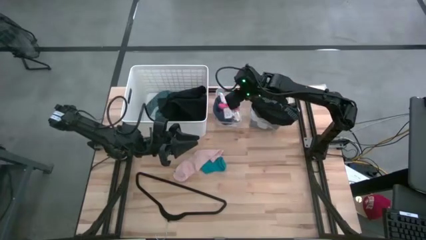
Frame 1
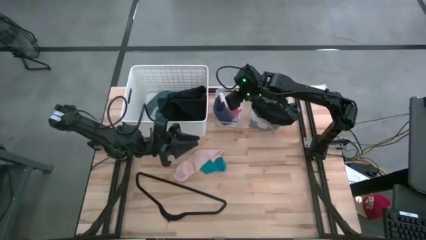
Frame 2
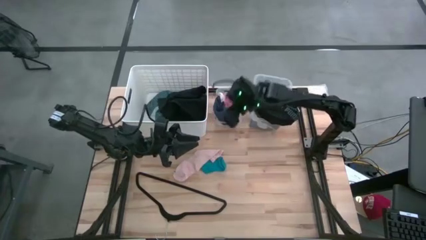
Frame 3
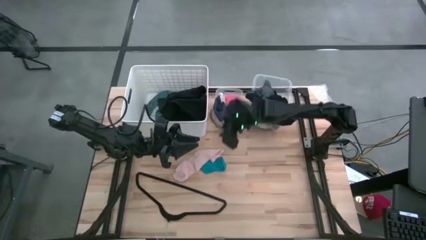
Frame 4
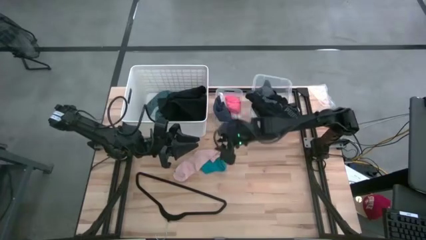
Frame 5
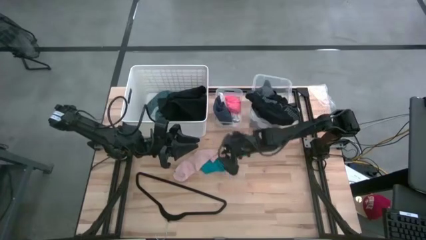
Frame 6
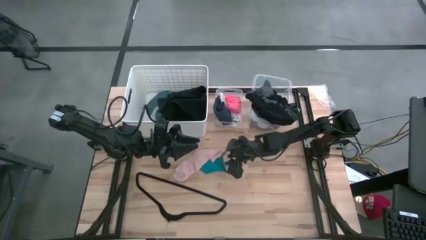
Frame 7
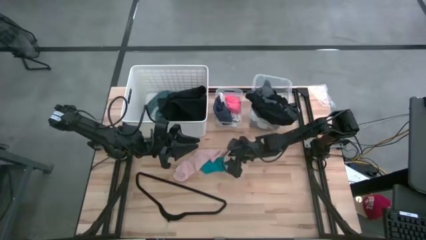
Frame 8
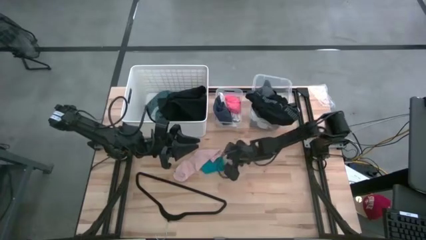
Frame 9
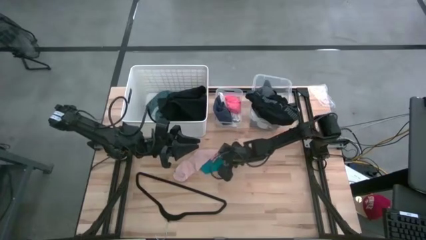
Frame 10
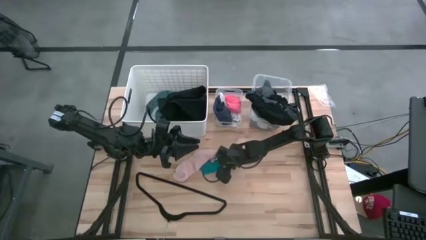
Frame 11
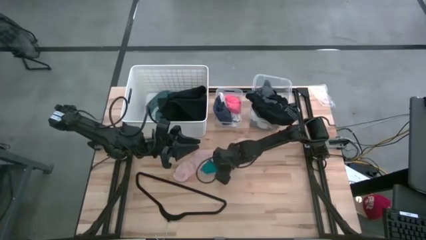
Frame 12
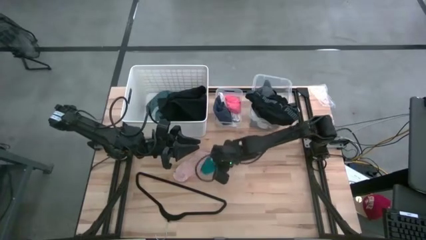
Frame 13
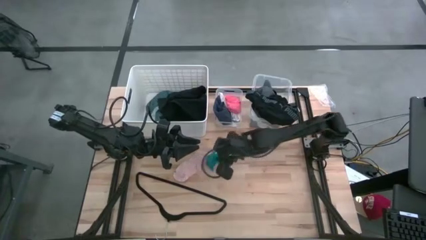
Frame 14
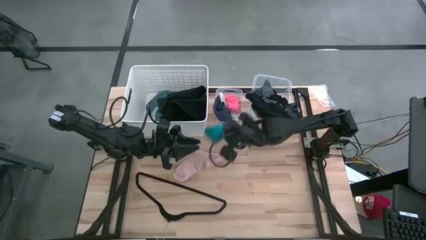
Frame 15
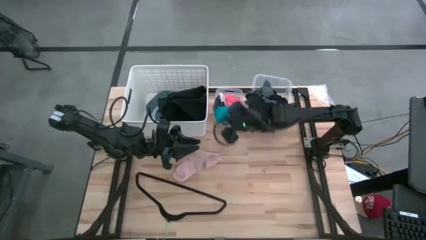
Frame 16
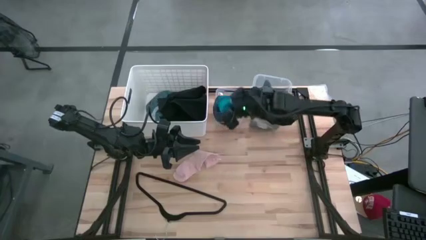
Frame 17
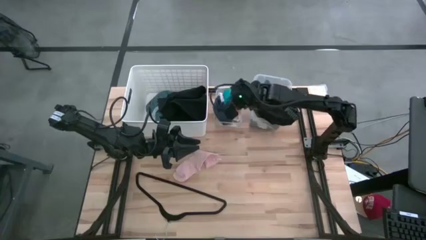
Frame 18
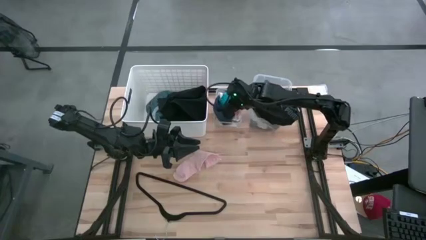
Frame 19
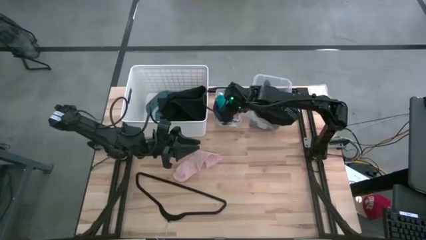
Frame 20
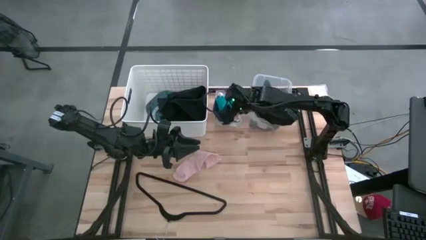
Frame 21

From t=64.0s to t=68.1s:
Task: Pick & Place Cloths
Put the light blue sock into the small transparent bin

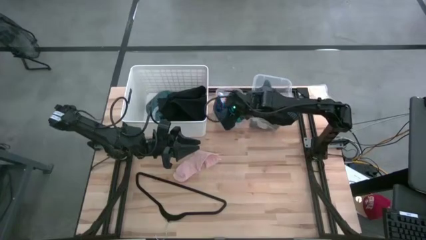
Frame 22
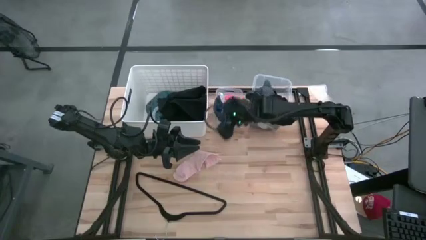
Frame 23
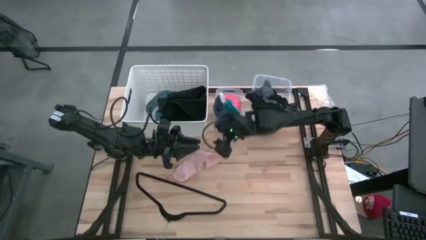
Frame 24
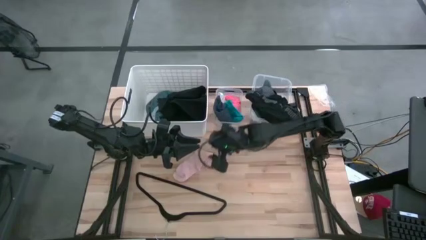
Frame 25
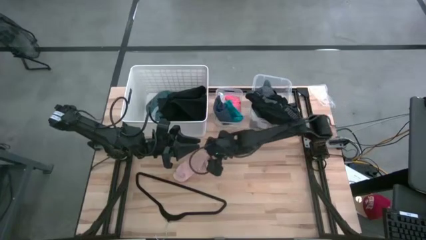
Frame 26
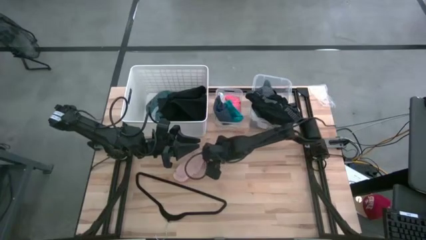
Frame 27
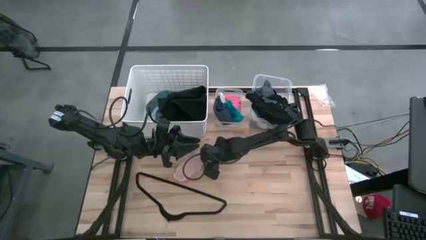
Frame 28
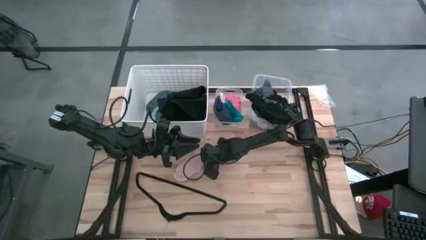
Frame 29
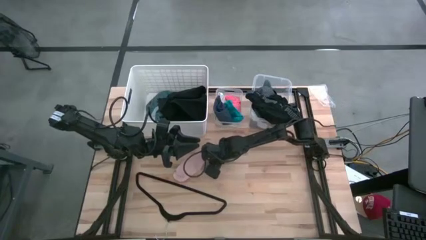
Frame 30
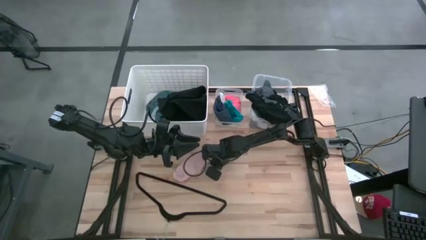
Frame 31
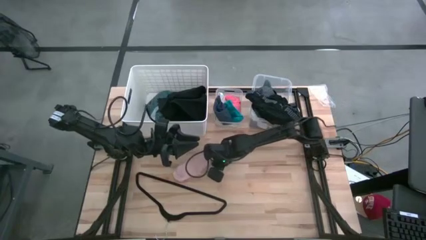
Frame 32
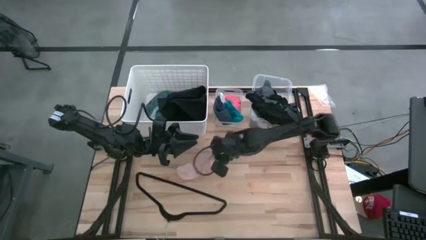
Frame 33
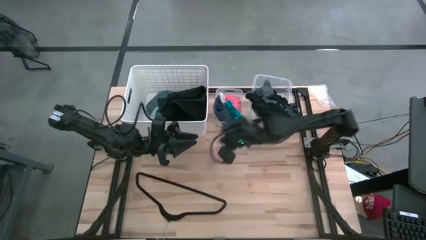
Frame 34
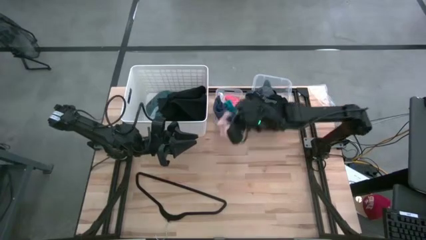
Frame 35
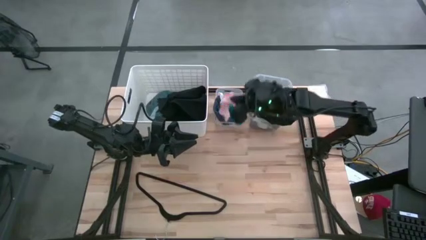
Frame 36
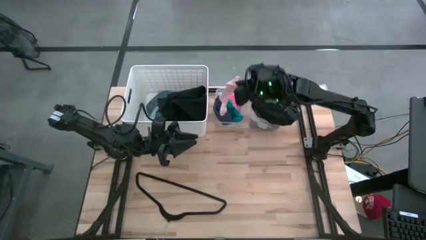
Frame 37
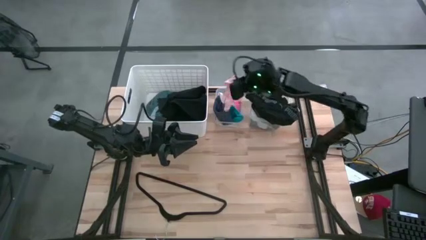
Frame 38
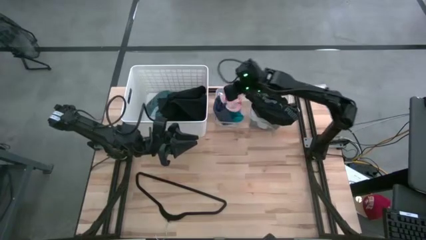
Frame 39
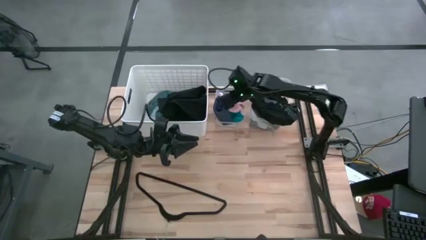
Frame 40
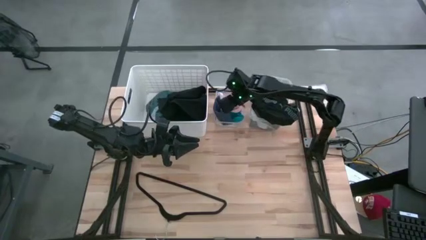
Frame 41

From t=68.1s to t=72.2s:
Put the pink sock into the small transparent bin

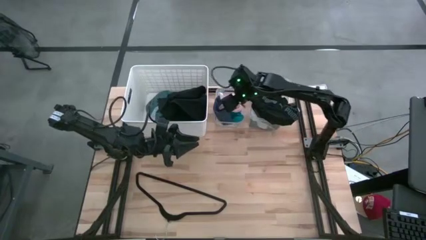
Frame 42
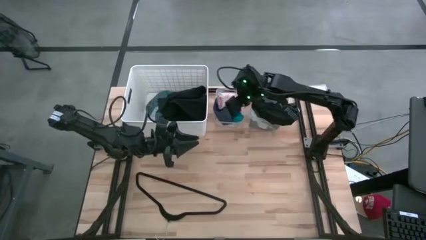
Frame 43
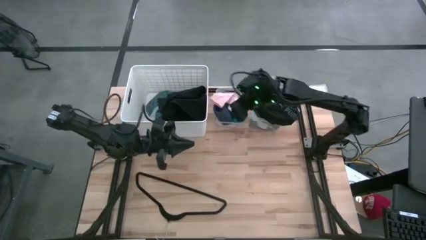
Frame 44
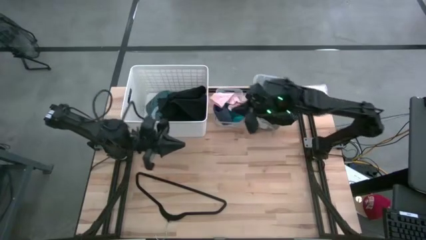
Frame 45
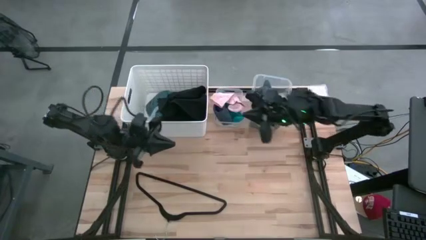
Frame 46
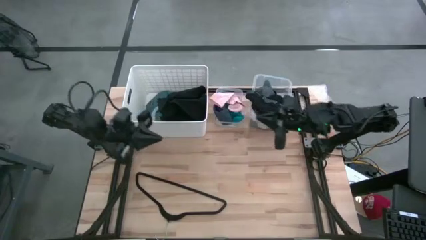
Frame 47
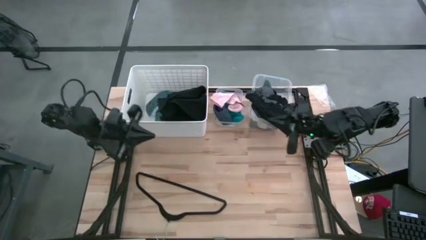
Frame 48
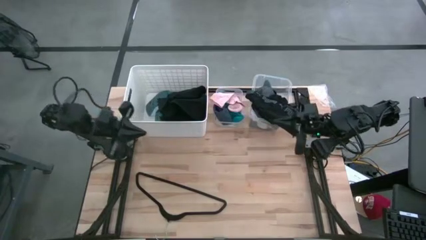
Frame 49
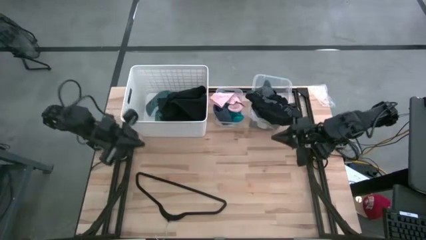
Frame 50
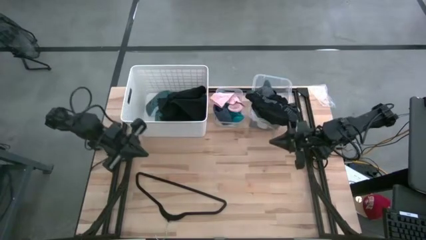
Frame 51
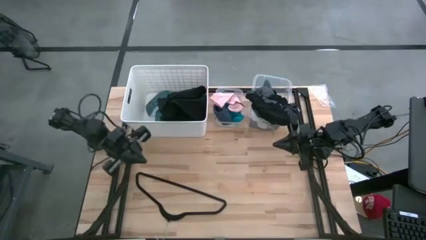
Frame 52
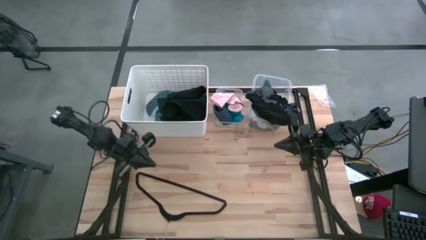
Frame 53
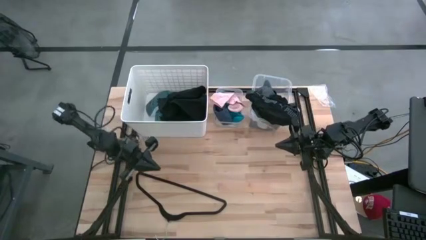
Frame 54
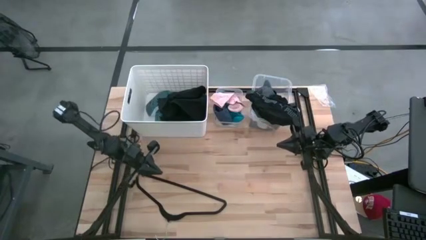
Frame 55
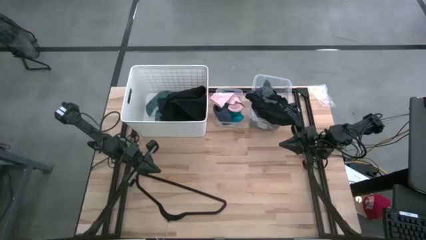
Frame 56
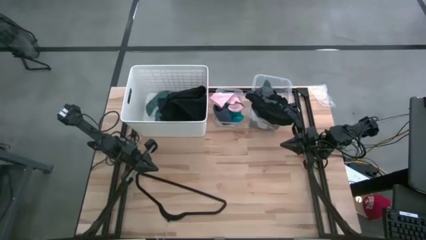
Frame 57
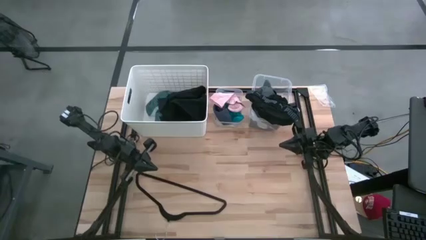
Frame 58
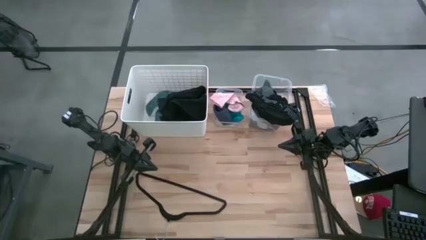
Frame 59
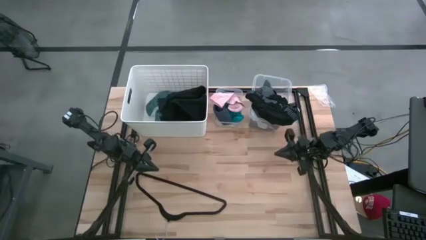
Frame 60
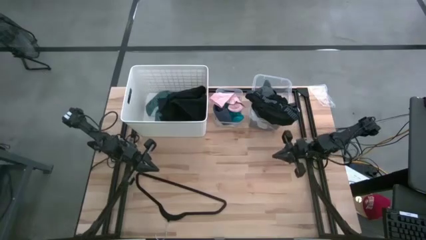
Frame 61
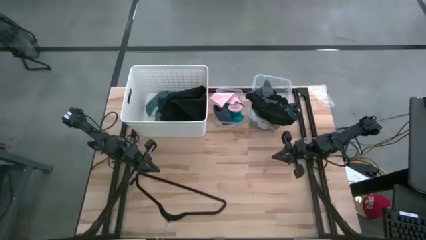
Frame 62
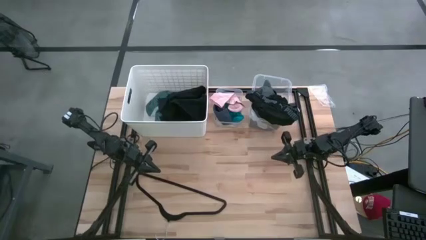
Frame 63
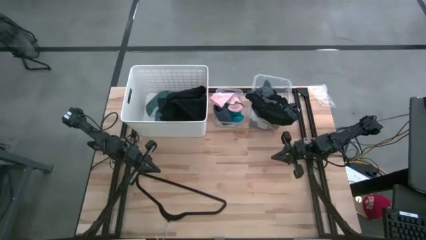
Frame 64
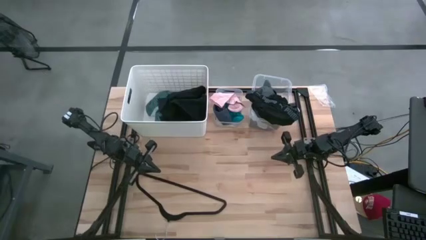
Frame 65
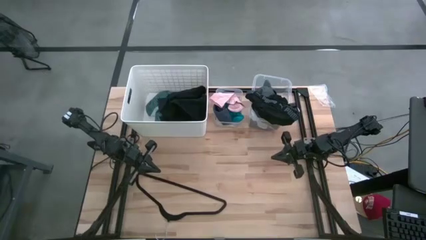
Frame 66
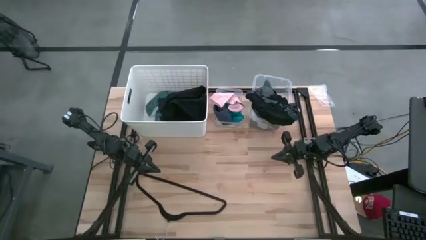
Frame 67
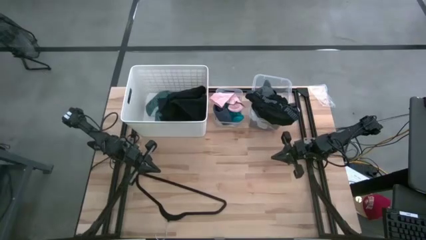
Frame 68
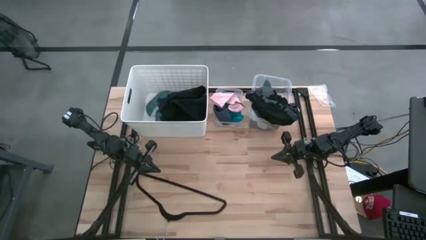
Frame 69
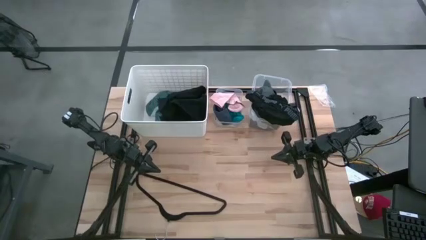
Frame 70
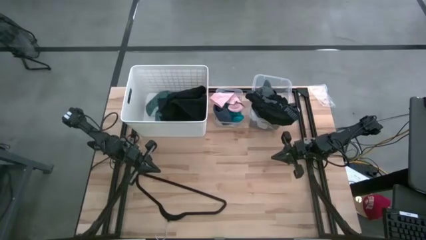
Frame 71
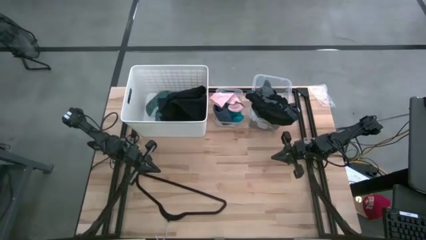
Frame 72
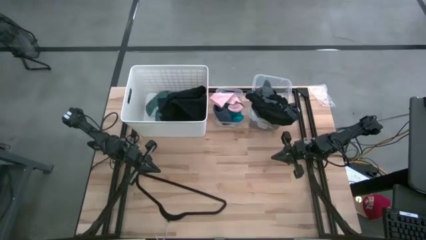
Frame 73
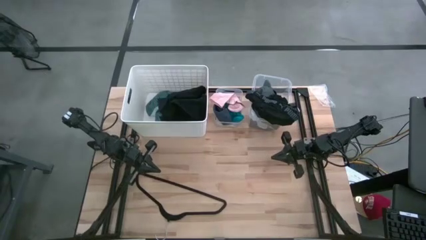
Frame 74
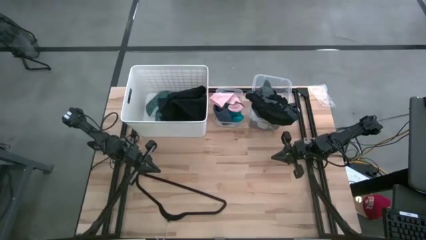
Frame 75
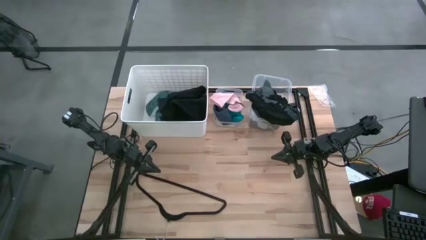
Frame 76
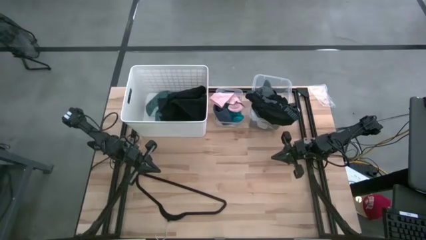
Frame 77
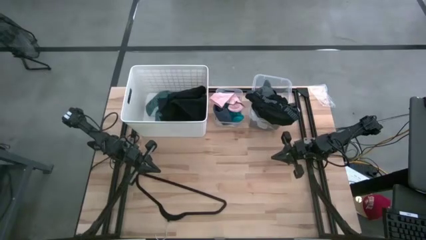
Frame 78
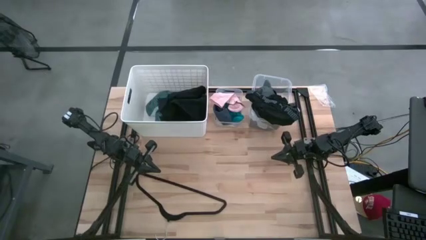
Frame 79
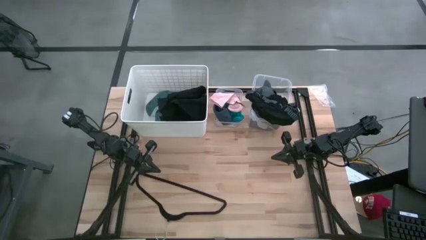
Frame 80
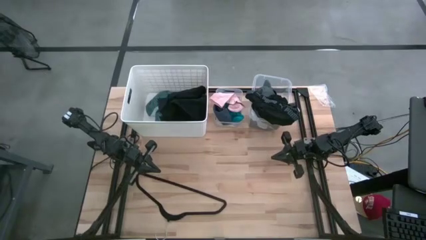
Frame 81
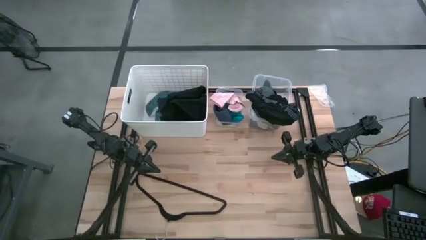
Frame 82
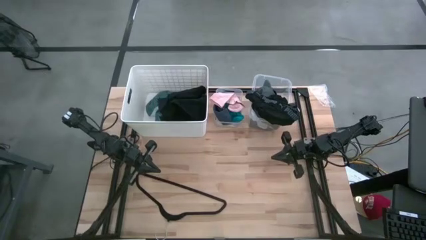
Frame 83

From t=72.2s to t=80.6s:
Return to Home Position
